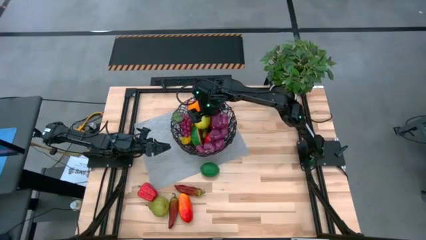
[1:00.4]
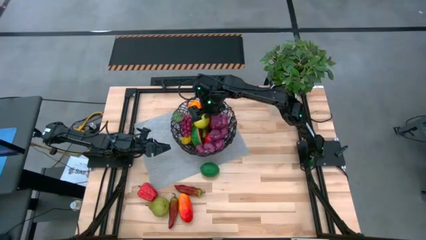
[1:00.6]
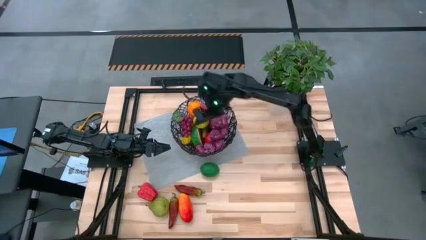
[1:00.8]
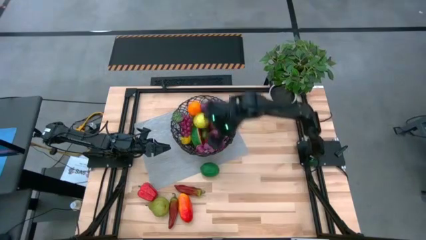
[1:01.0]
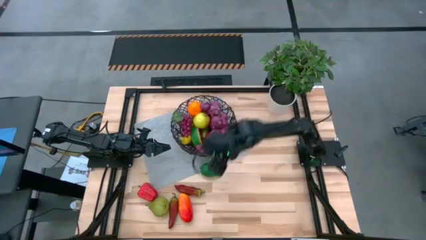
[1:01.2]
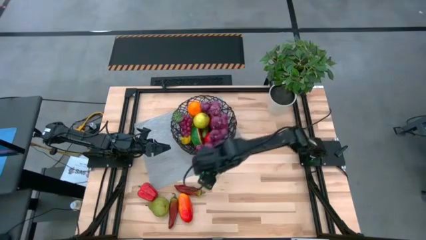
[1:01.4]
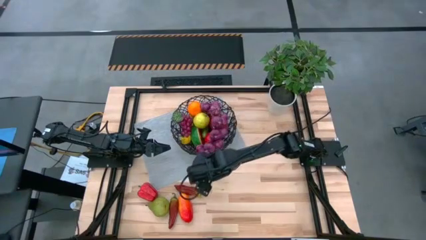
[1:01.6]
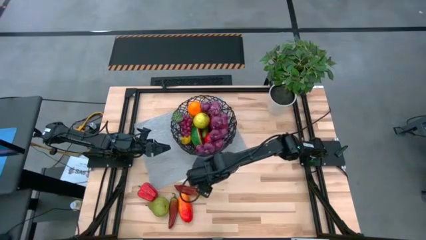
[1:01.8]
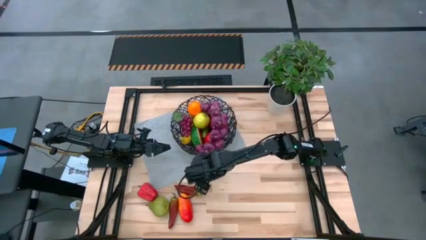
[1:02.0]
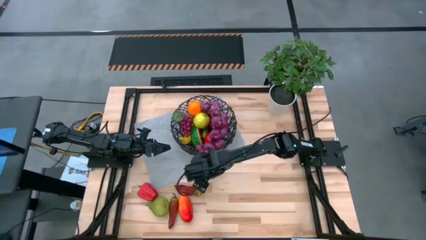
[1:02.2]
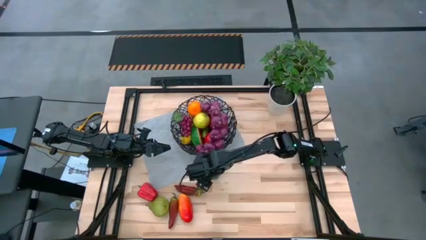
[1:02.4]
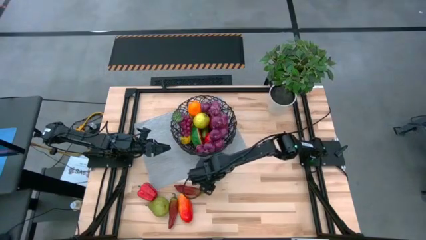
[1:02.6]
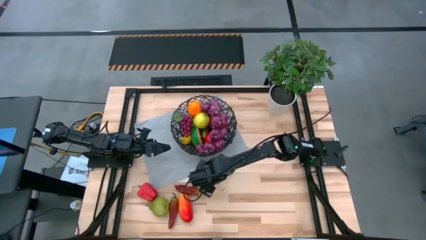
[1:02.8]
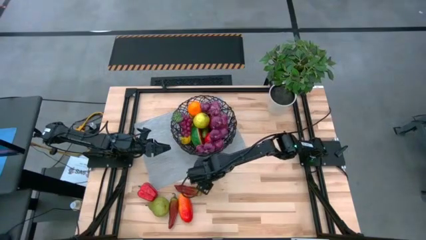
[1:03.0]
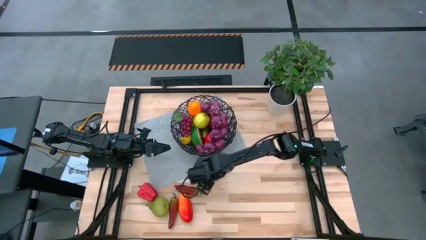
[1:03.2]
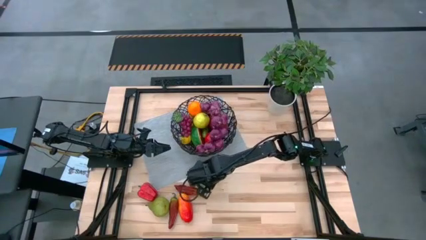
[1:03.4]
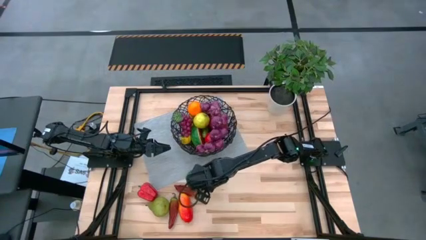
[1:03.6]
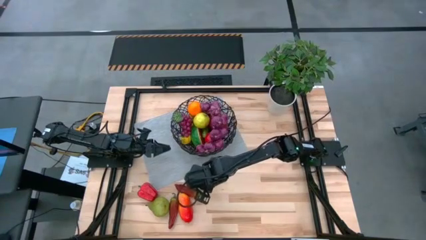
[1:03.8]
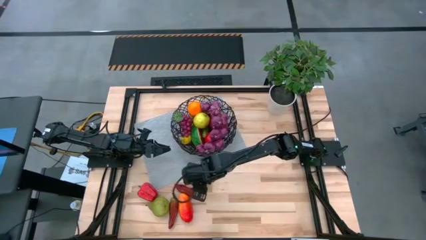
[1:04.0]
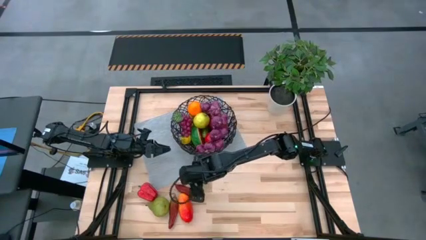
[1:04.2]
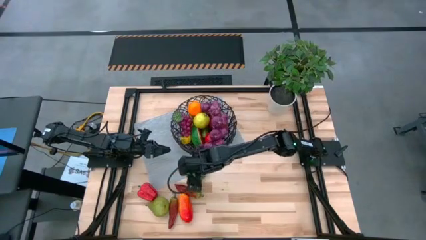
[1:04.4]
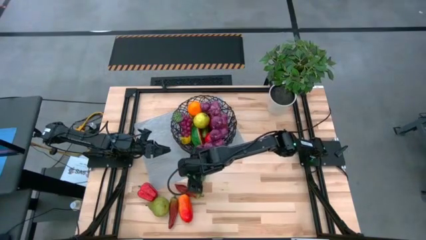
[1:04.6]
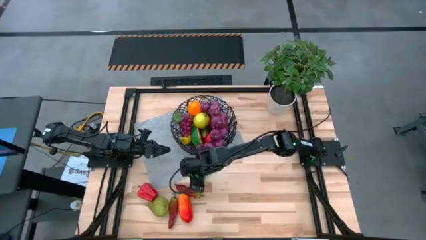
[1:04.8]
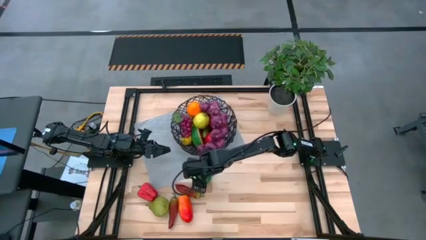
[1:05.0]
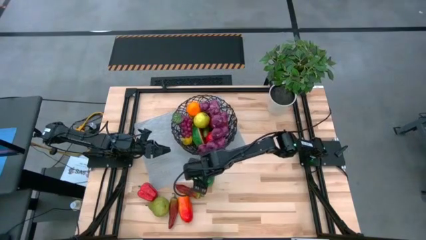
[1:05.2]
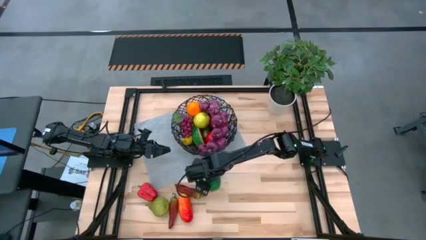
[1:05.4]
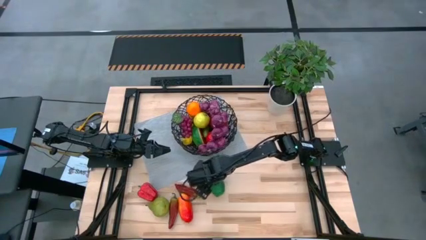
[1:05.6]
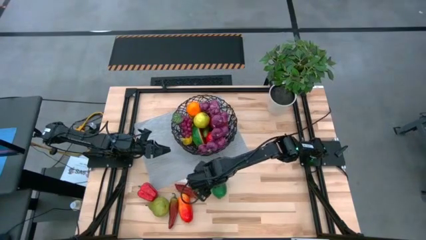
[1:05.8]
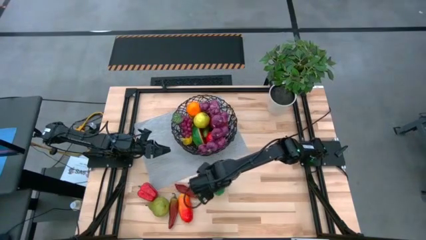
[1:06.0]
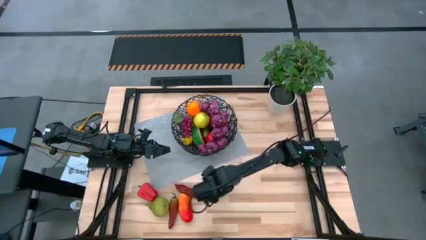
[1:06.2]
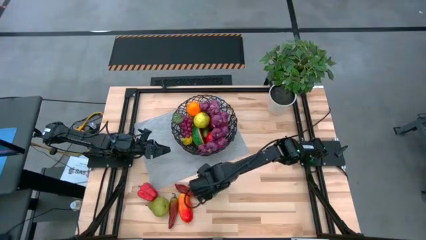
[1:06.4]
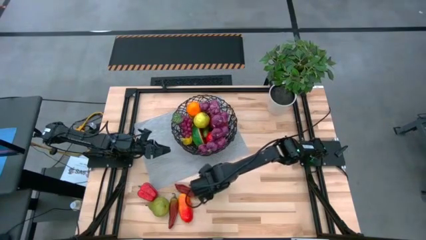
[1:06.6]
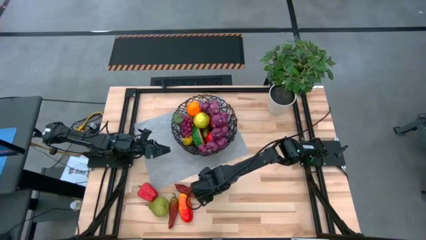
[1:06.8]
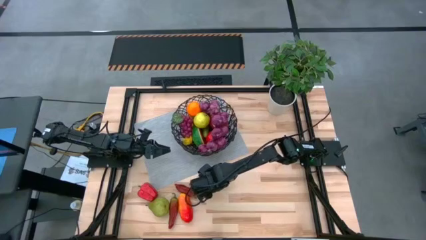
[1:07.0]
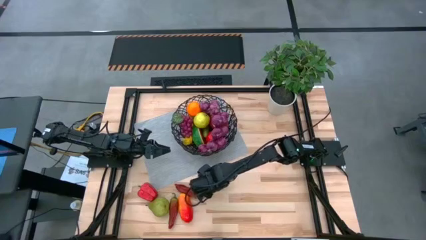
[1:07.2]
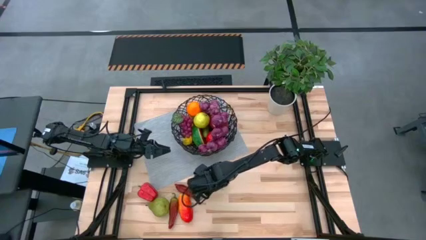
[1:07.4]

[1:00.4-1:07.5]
Task: Build produce basket
Put the green lime into the wire basket

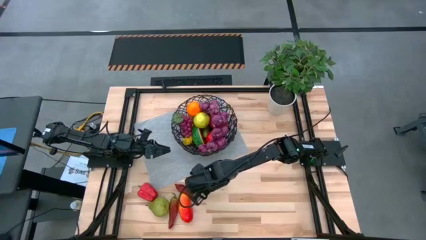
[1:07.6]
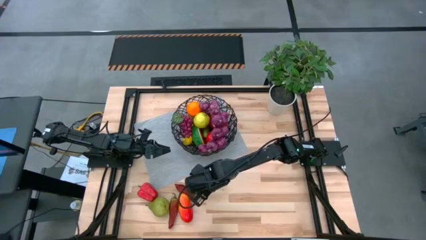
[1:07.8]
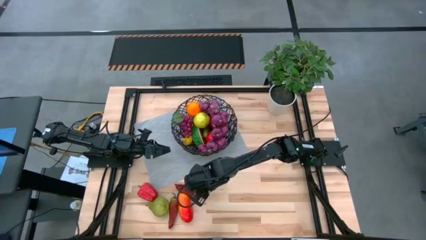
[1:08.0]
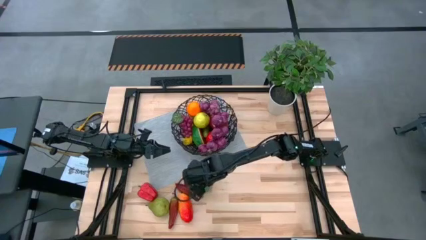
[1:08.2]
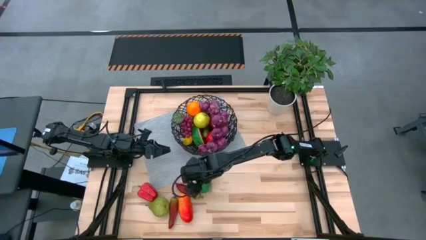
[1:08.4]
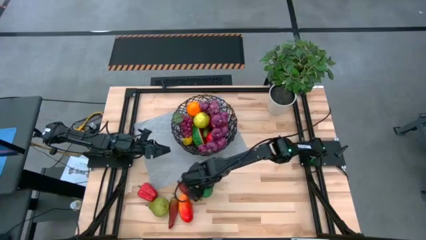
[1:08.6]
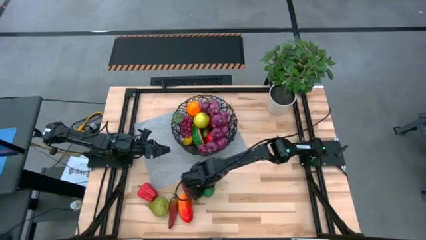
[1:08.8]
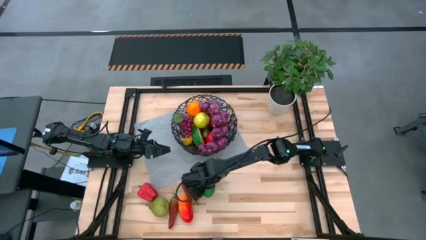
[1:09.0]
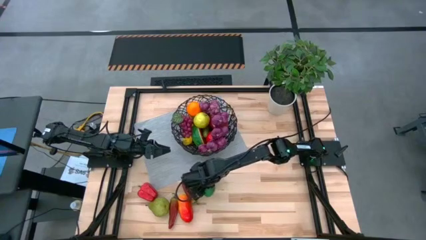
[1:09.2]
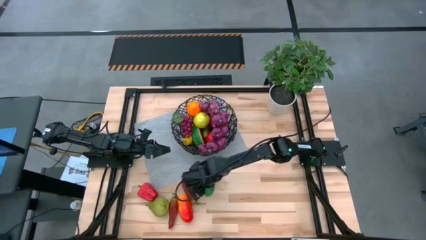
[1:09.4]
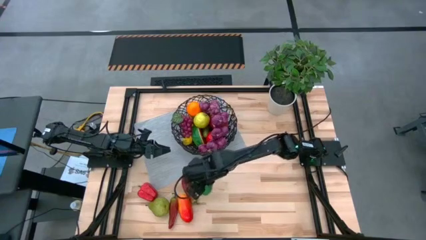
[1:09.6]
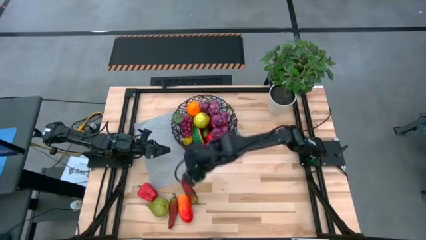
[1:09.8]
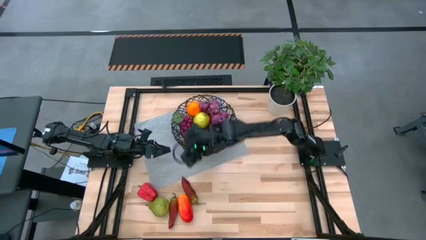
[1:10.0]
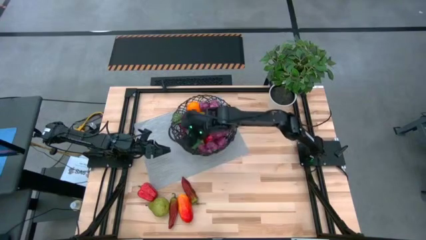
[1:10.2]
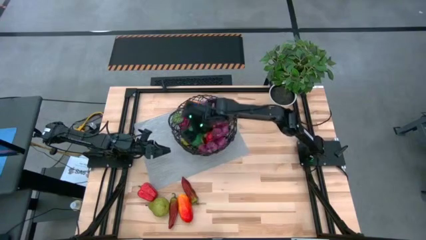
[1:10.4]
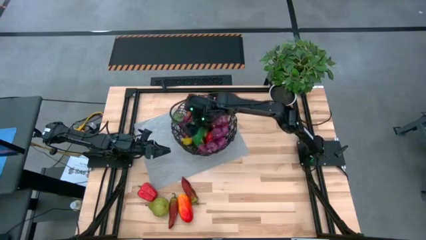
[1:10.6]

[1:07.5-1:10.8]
Put the green lime into the wire basket

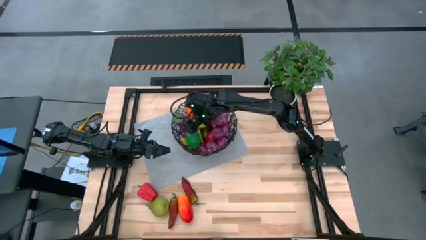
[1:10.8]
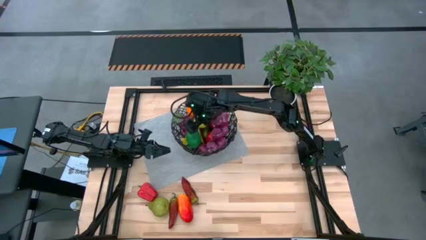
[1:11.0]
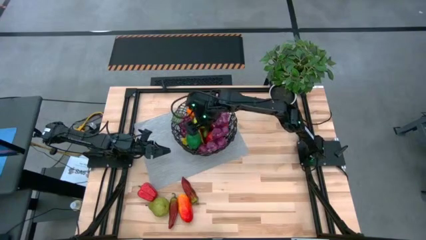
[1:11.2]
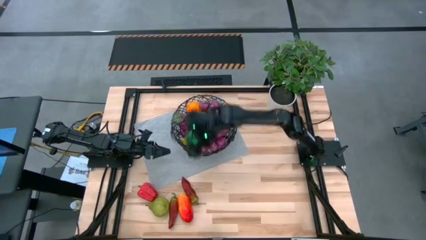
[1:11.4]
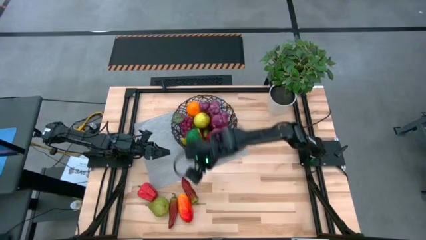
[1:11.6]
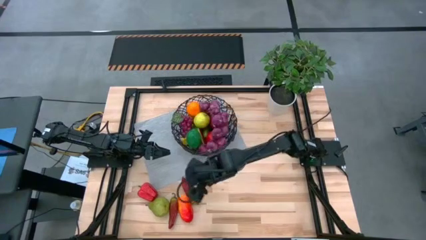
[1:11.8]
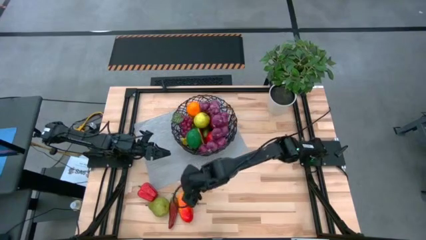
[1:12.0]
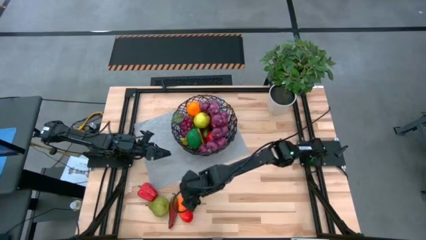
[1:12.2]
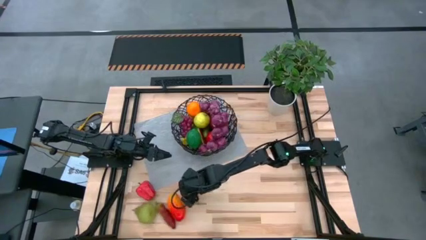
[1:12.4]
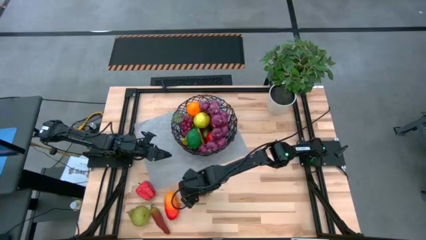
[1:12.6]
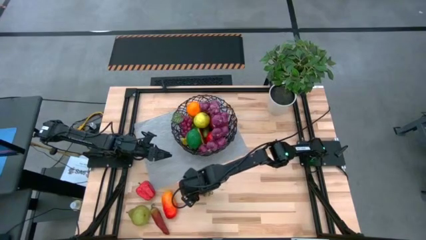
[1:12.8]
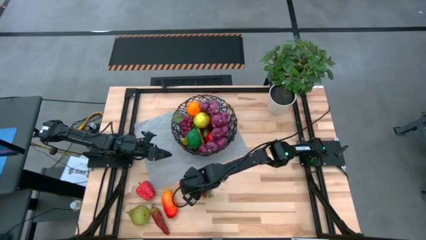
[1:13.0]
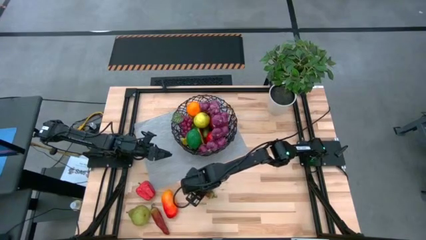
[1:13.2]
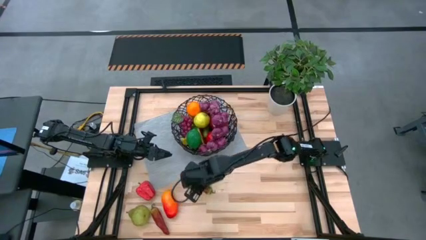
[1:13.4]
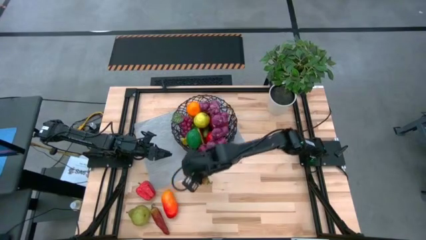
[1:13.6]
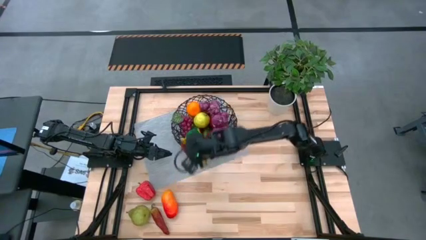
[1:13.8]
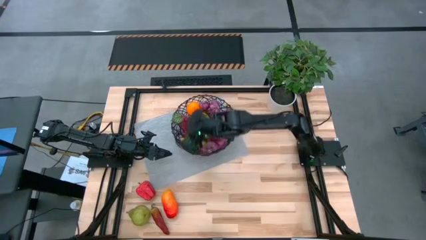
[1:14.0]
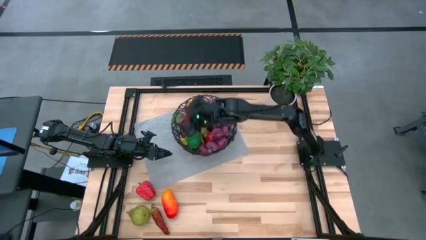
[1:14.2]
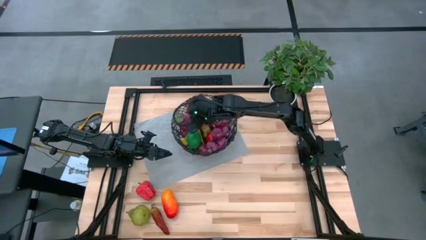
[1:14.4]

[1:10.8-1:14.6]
Put the top chili pepper into the wire basket

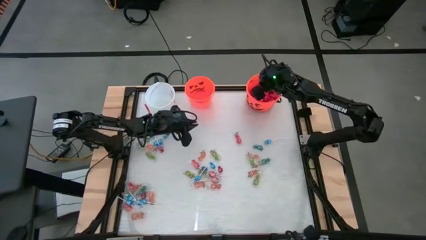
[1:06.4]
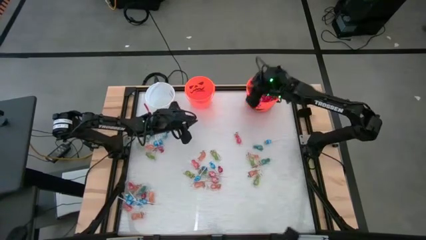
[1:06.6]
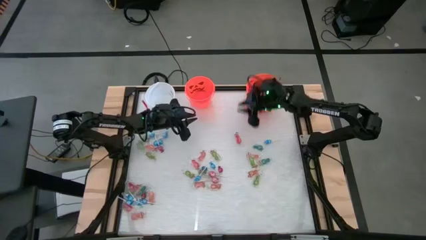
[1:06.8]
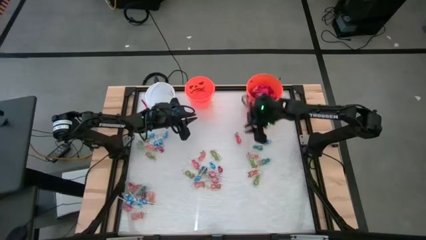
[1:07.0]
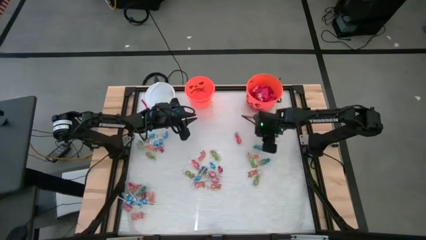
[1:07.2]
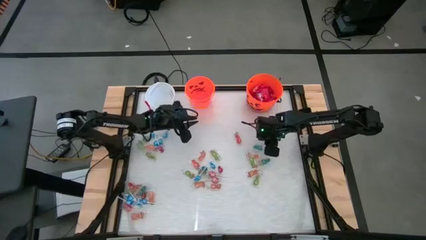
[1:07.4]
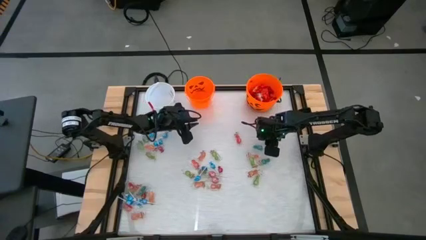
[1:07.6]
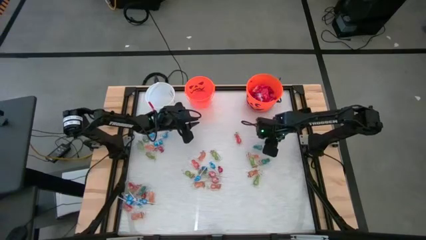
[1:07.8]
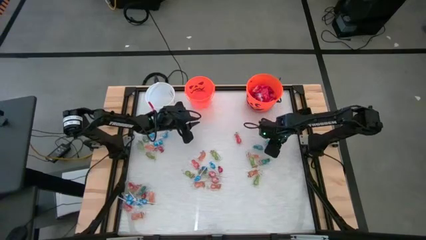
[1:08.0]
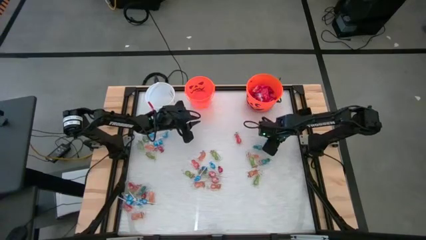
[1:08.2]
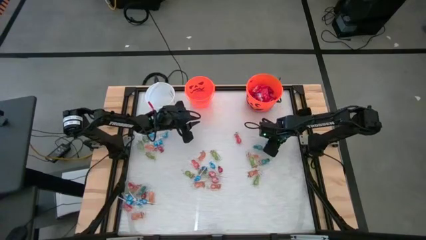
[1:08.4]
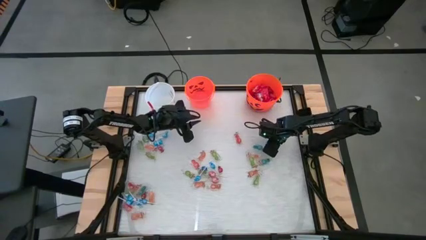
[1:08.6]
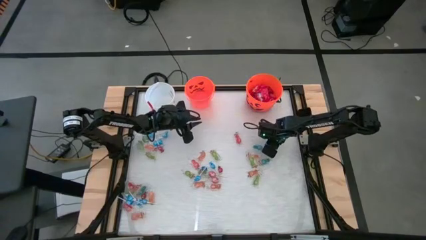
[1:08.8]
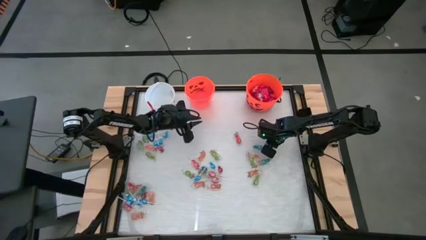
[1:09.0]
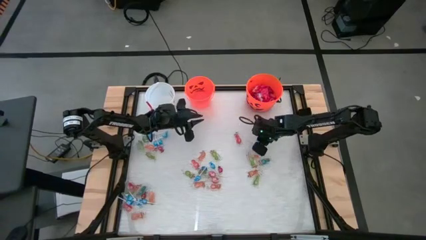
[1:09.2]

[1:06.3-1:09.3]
Task: Sort candy by brand, put in halloween buckets
Put the blue lollipop into the left orange bucket
